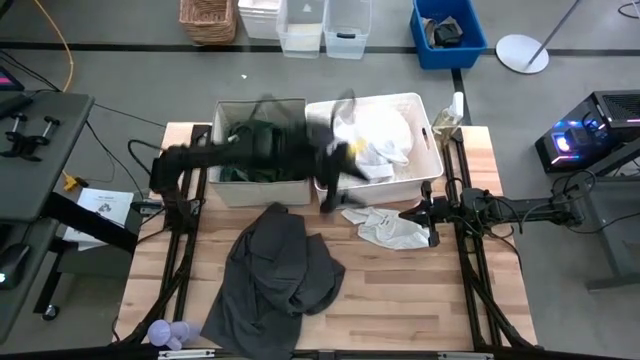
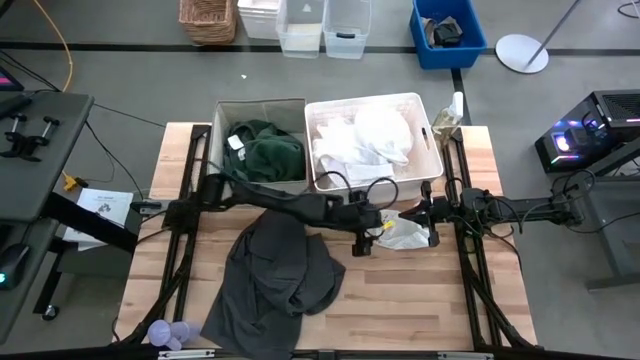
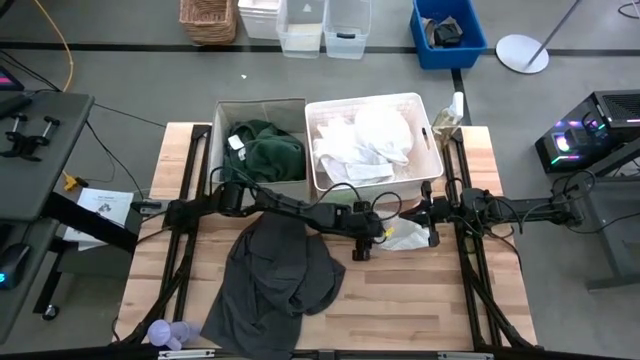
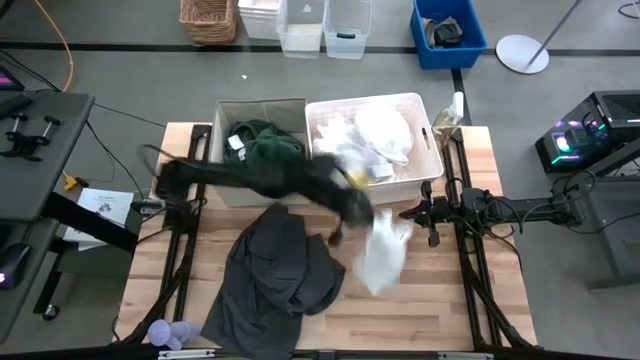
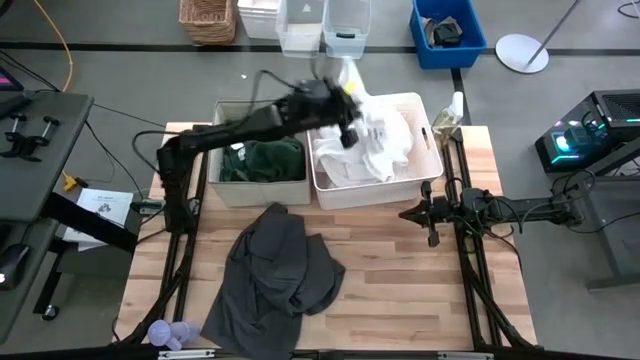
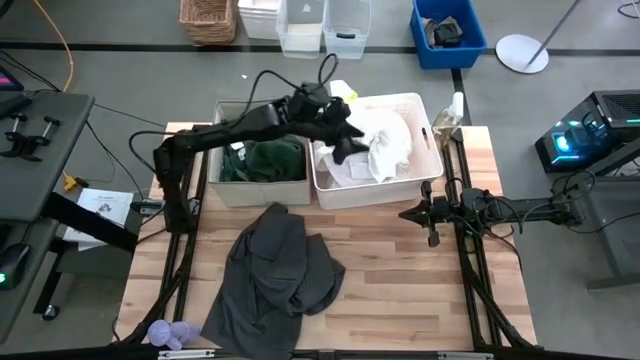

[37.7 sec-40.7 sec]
Task: Sort clothes
Put the white cloth into the white bin

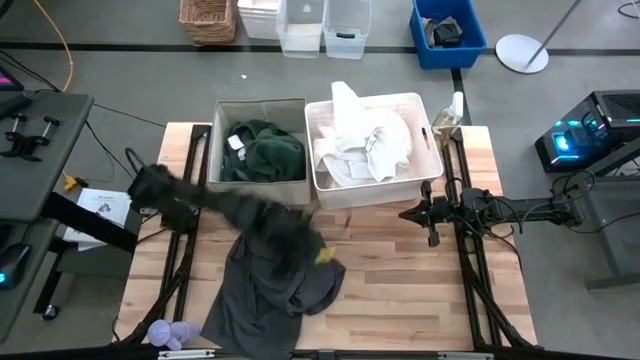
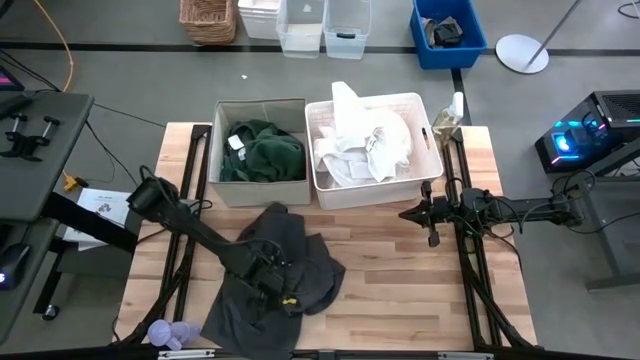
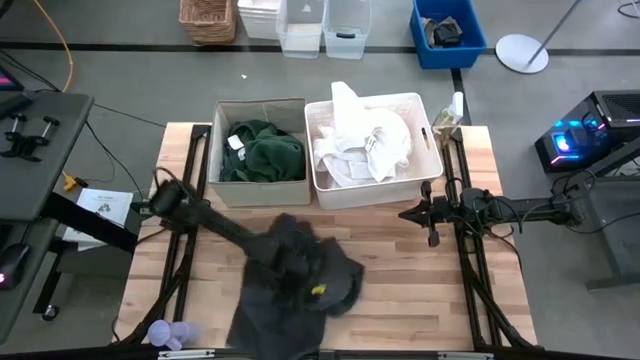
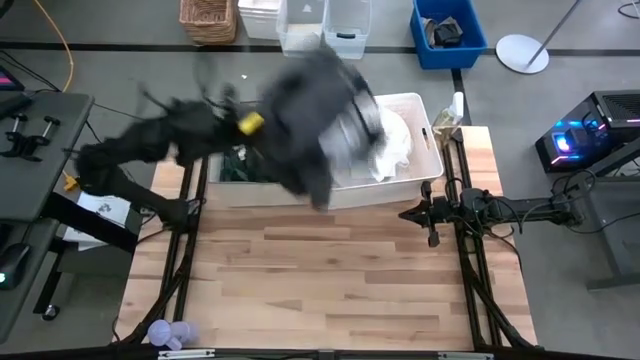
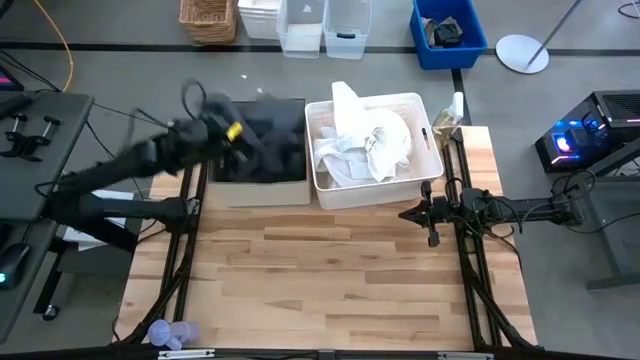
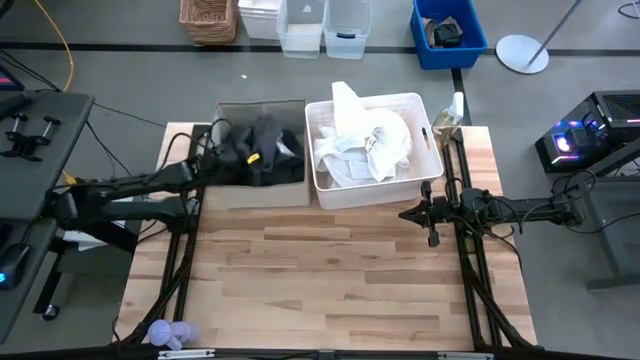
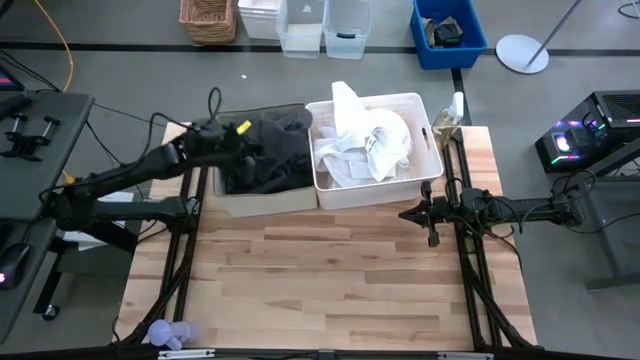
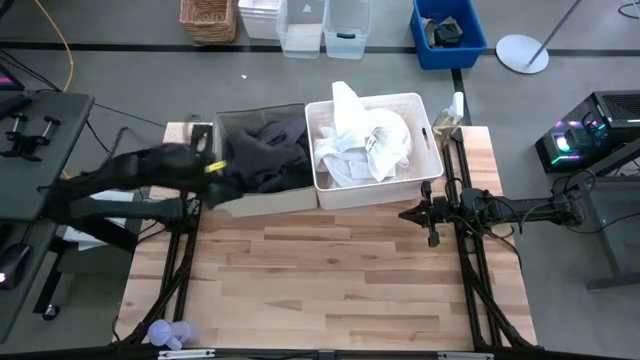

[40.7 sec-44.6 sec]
Put the gray cloth into the laundry organizer

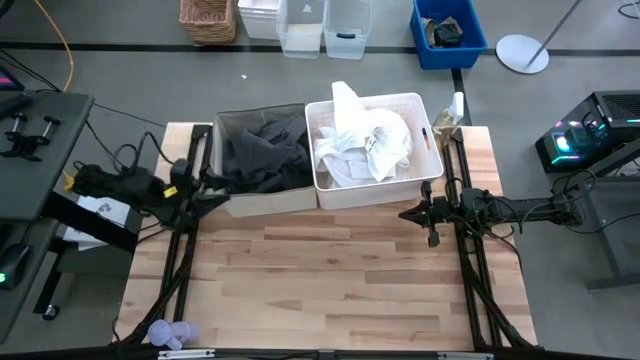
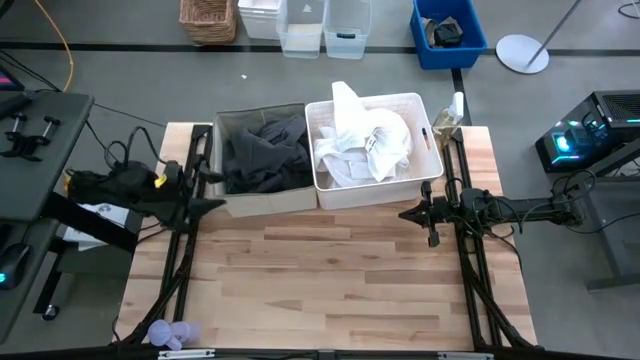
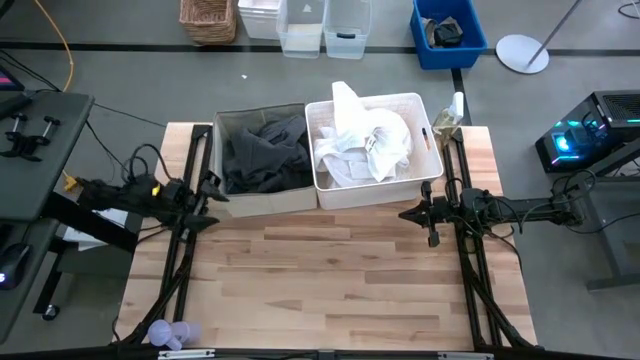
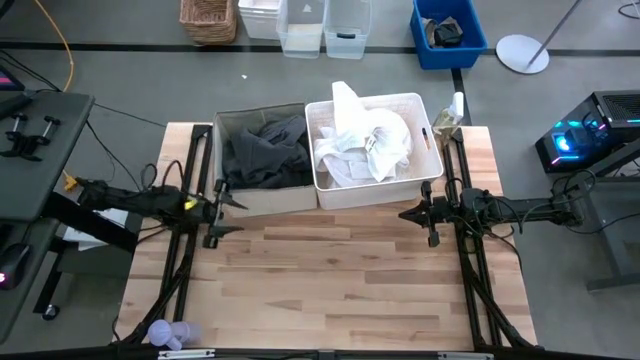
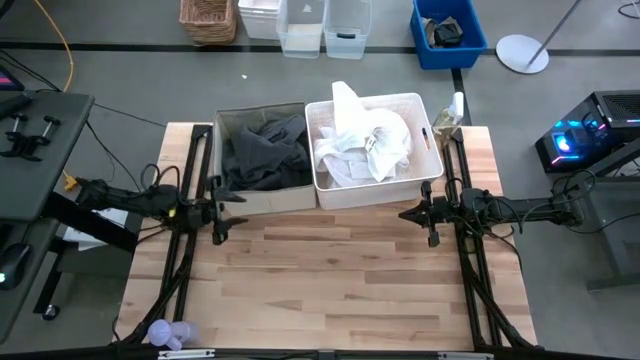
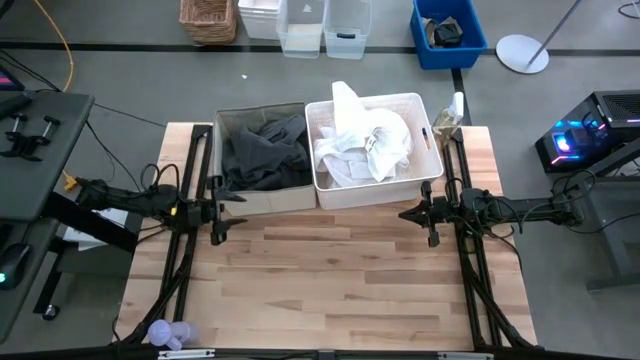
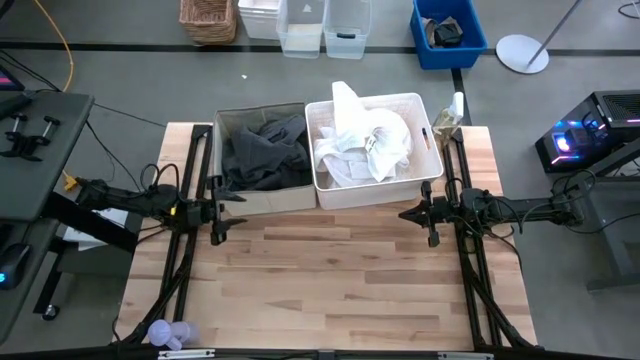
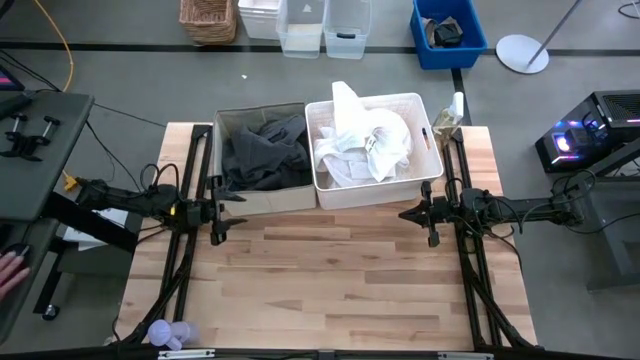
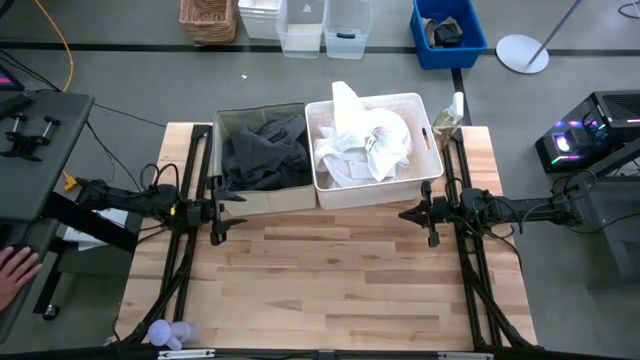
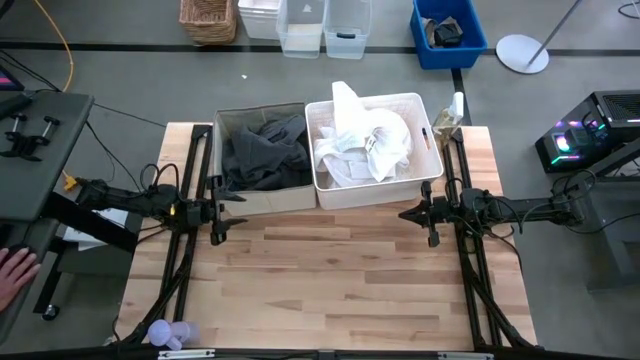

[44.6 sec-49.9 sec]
Return to Home Position

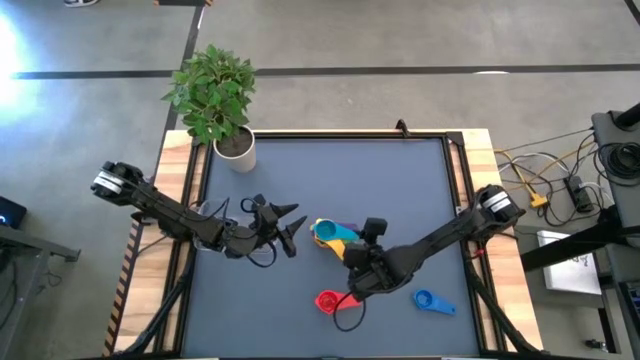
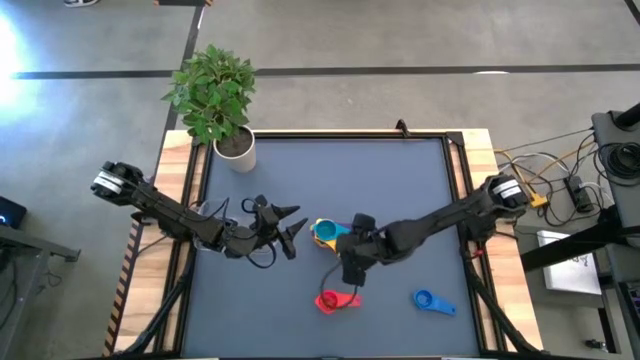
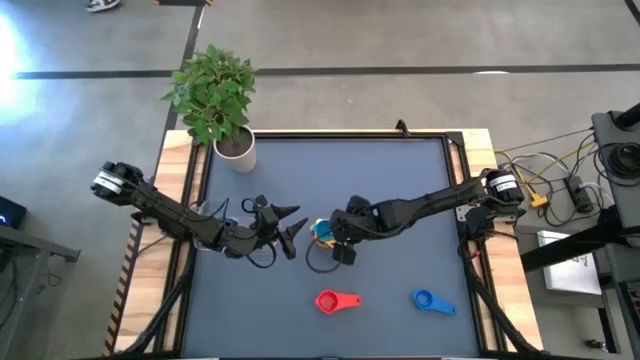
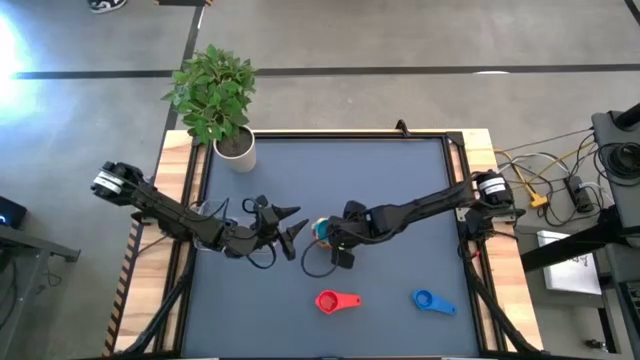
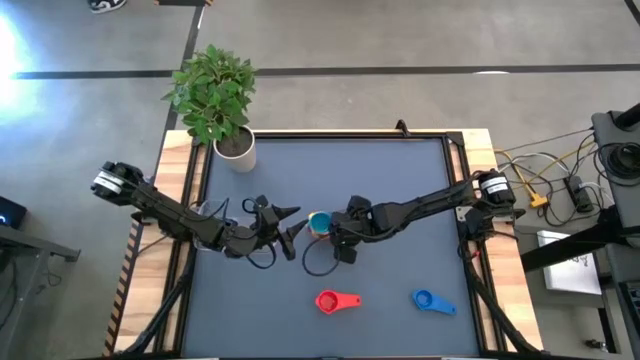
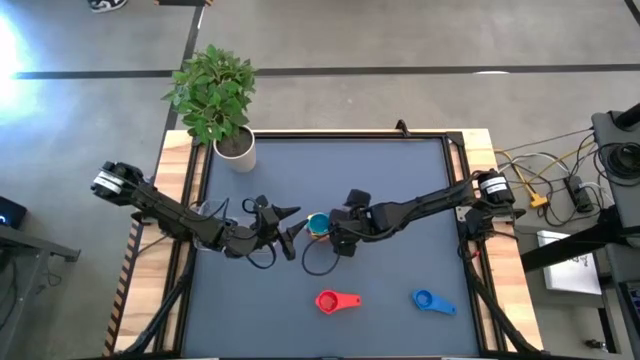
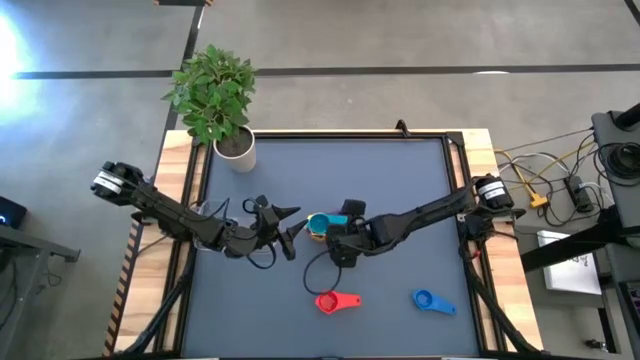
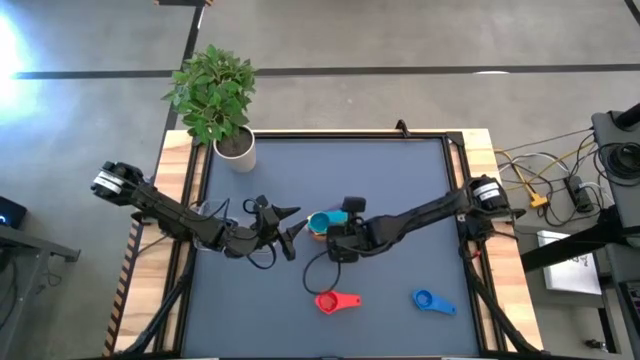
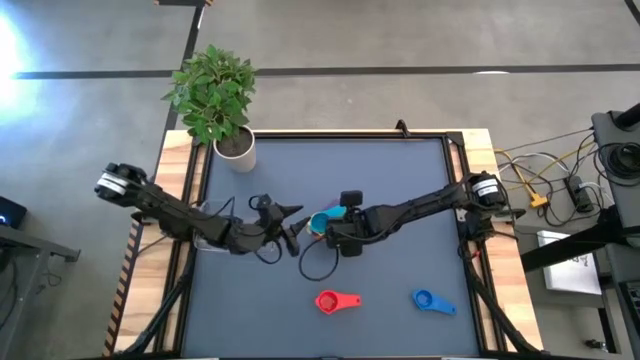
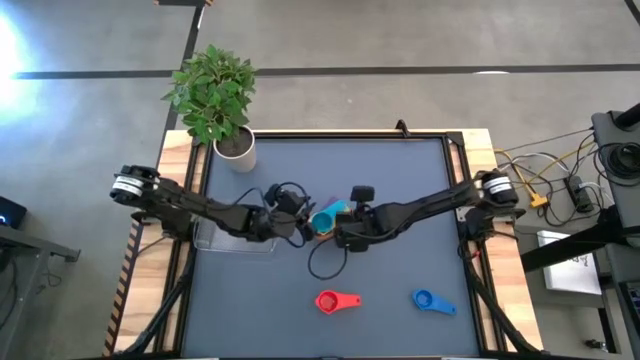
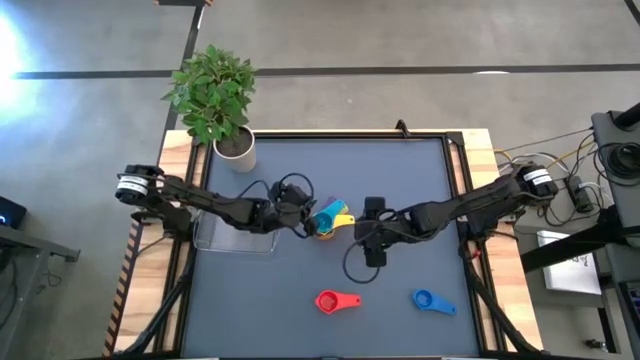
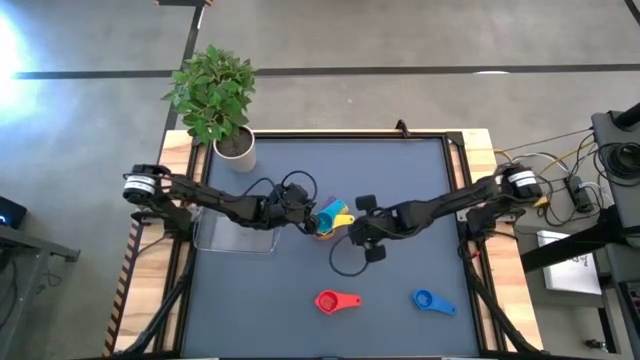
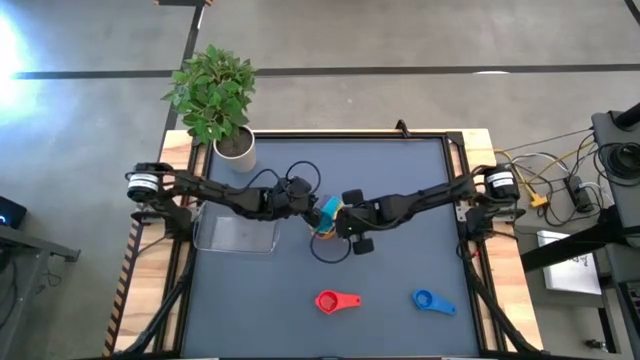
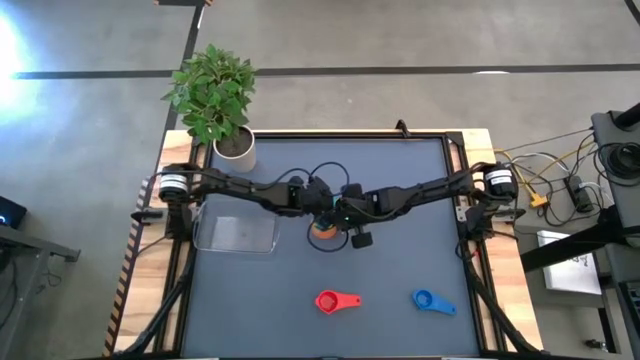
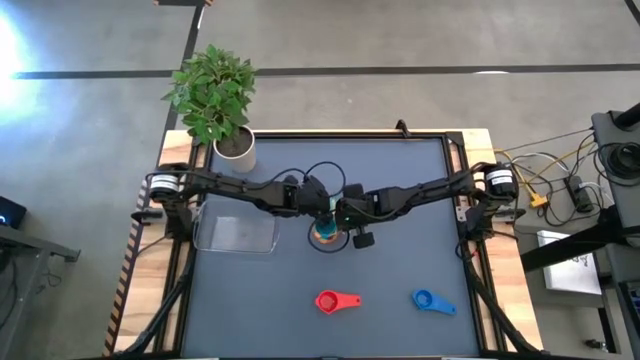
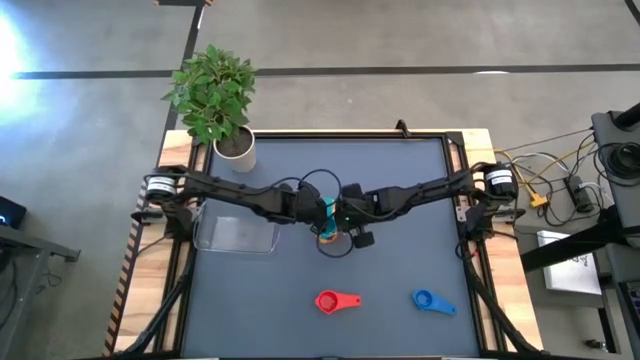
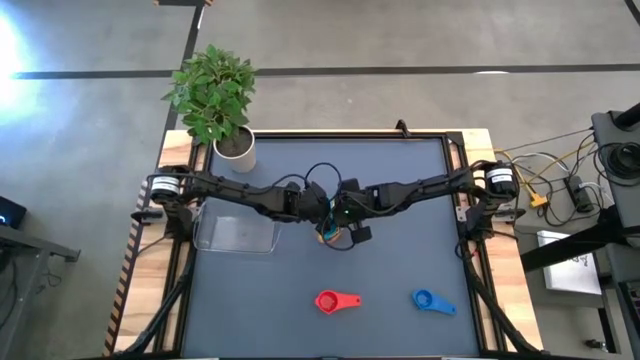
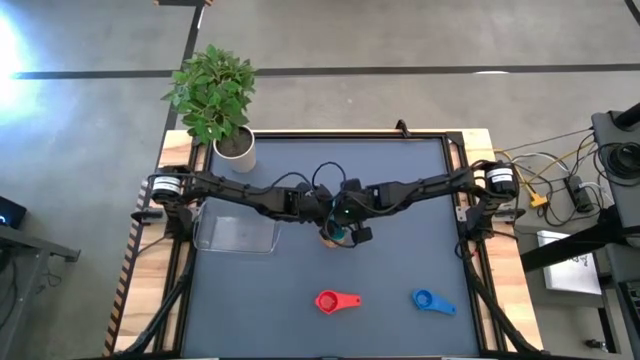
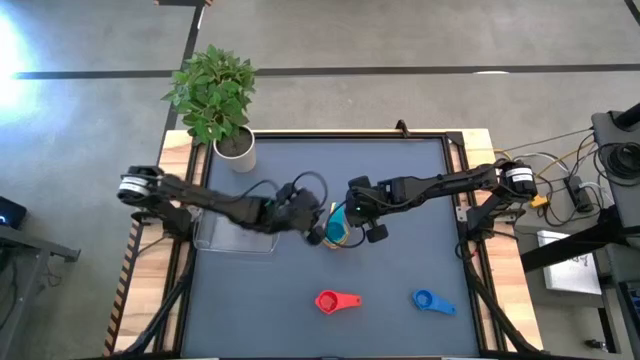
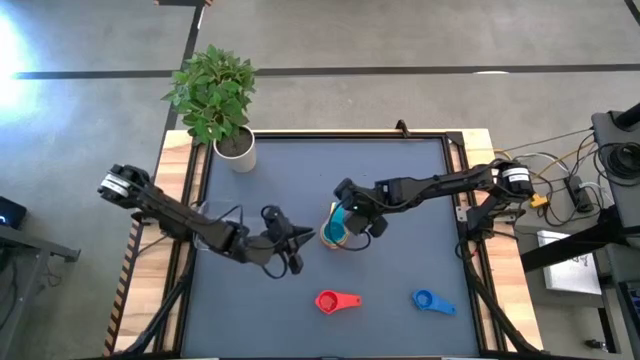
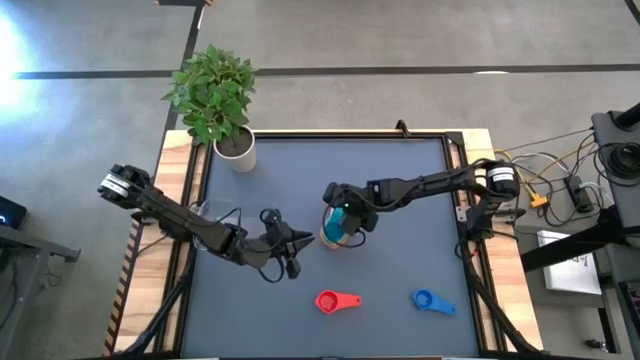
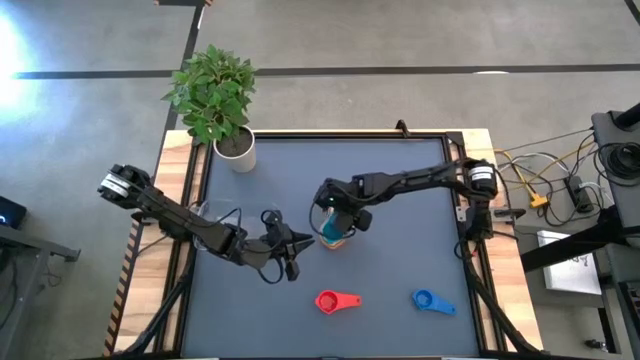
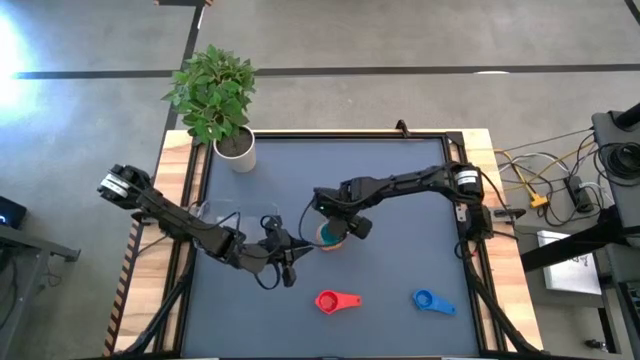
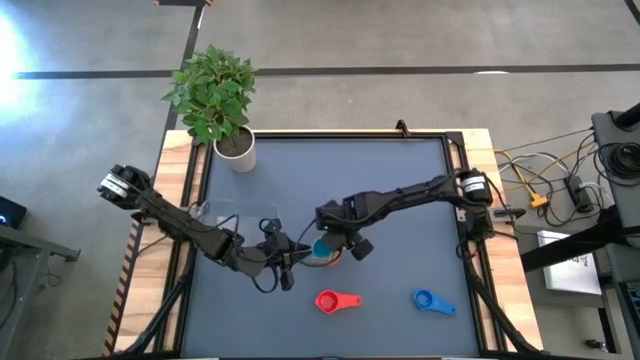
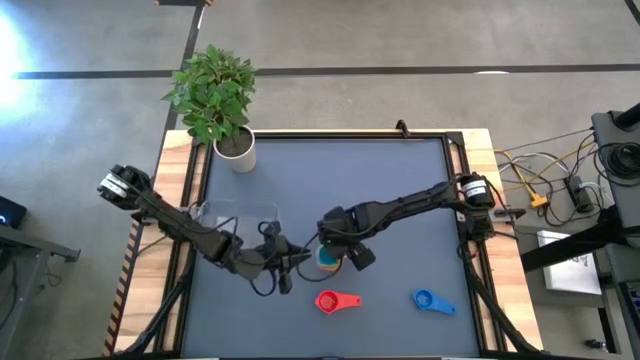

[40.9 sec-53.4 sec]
Task: Nest measuring cups in basket
Adjust the colored measuring cups
